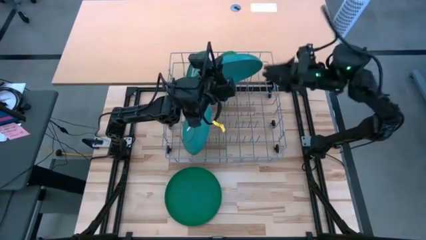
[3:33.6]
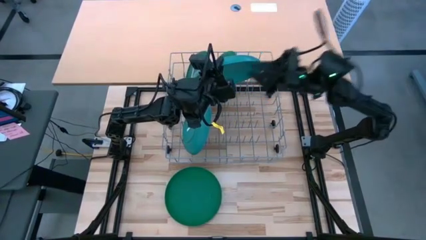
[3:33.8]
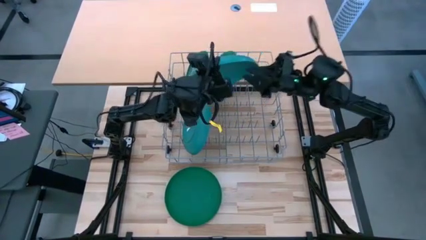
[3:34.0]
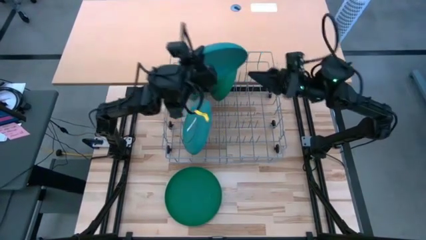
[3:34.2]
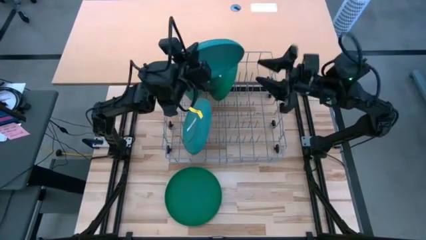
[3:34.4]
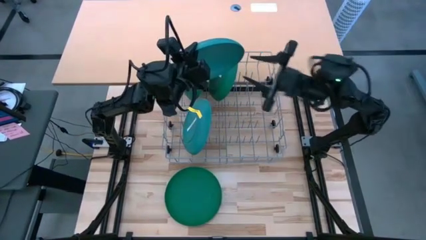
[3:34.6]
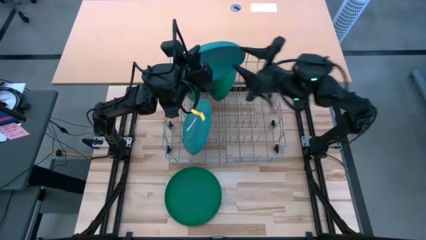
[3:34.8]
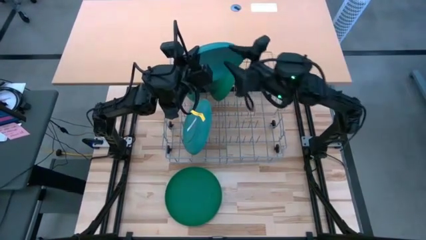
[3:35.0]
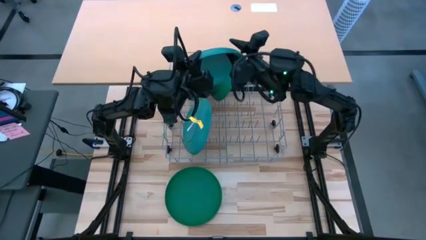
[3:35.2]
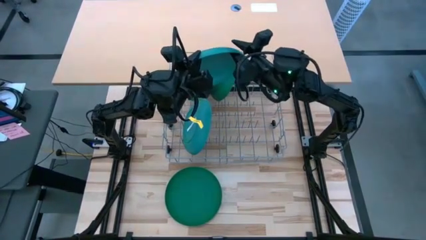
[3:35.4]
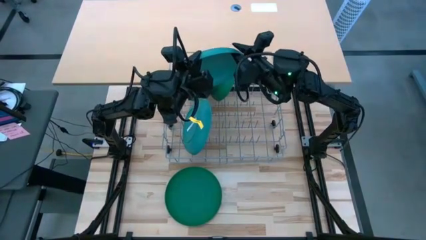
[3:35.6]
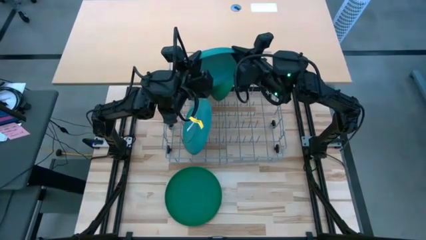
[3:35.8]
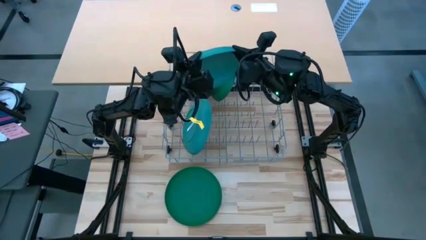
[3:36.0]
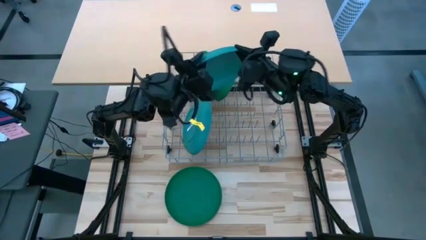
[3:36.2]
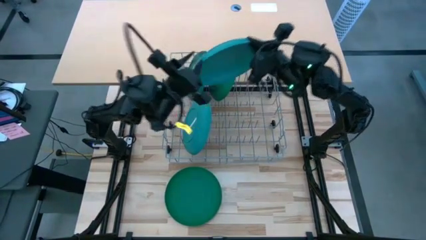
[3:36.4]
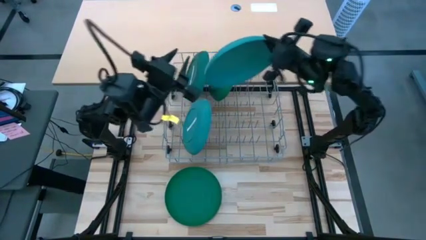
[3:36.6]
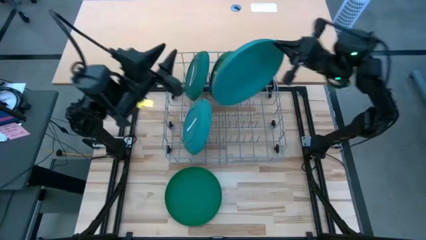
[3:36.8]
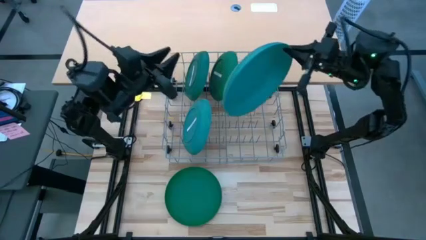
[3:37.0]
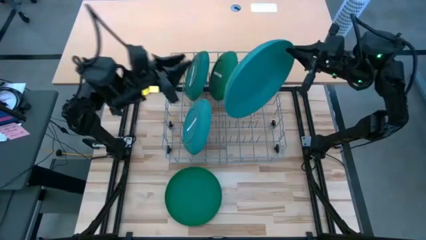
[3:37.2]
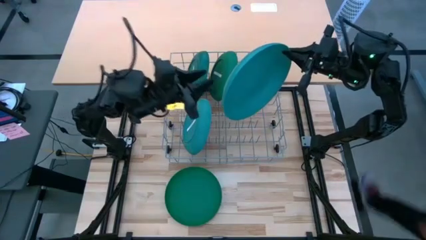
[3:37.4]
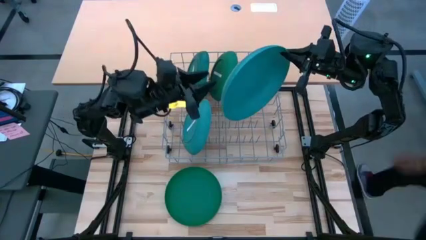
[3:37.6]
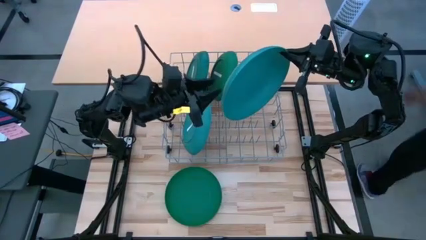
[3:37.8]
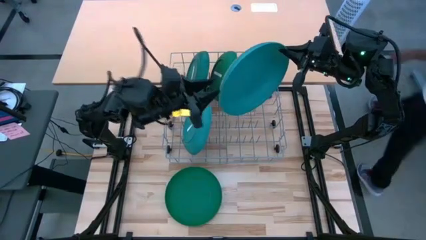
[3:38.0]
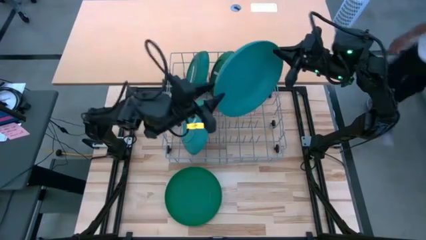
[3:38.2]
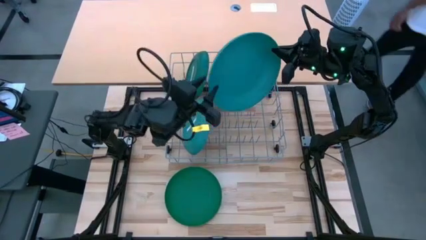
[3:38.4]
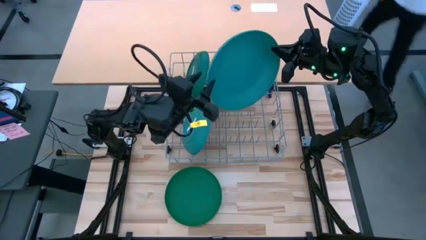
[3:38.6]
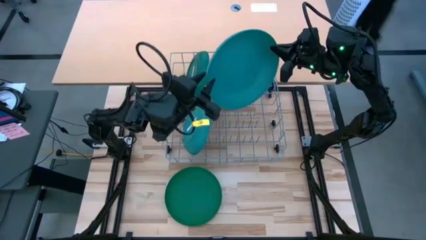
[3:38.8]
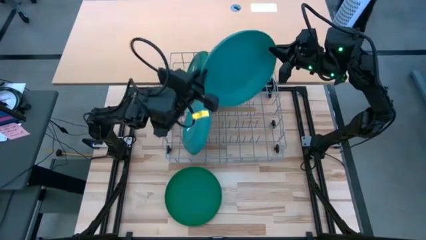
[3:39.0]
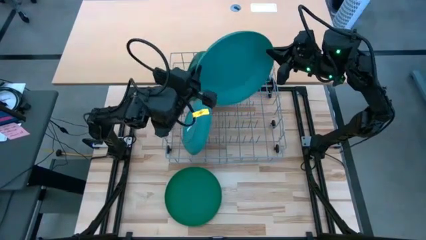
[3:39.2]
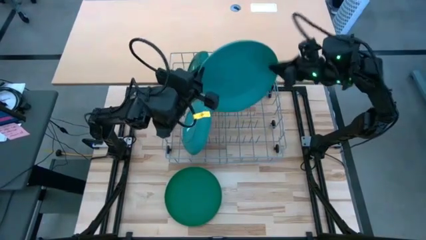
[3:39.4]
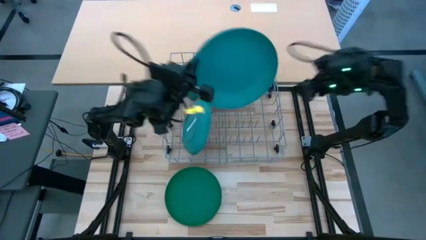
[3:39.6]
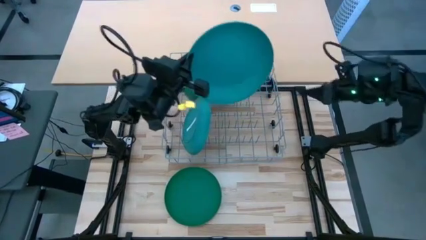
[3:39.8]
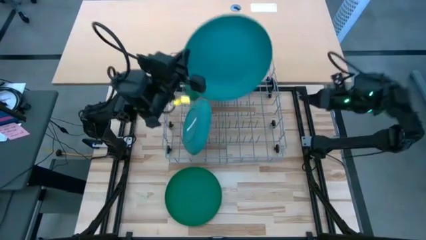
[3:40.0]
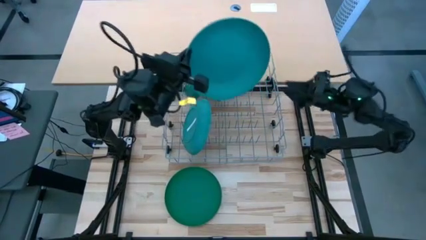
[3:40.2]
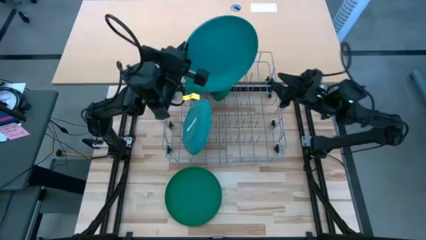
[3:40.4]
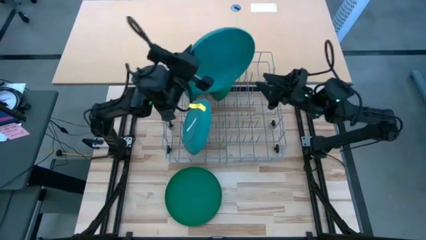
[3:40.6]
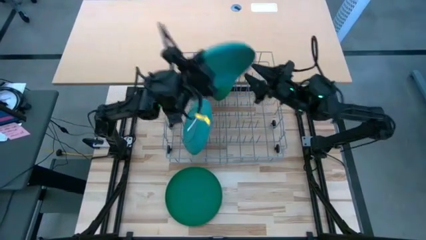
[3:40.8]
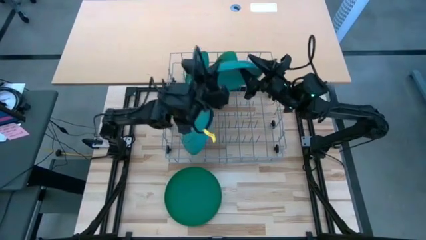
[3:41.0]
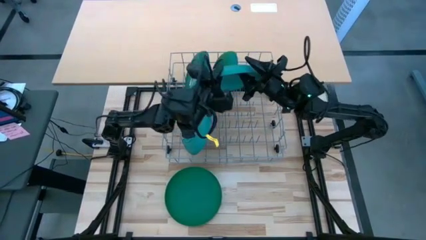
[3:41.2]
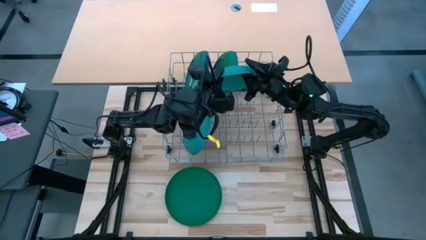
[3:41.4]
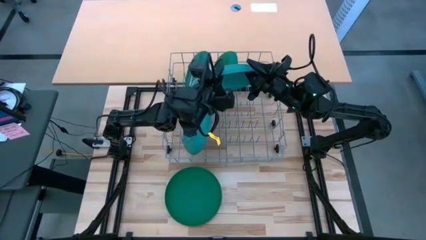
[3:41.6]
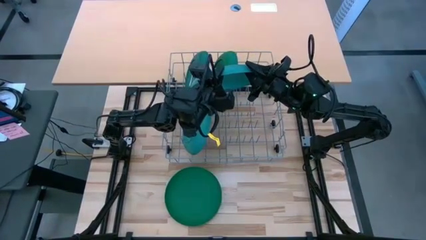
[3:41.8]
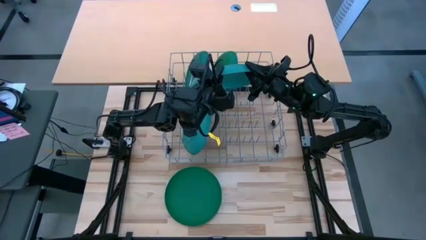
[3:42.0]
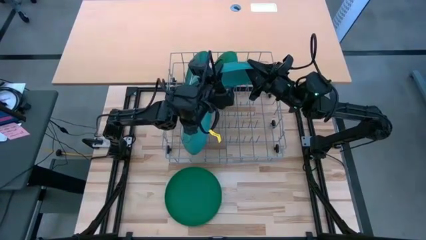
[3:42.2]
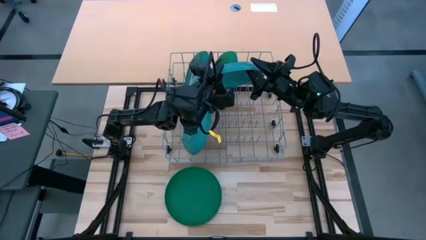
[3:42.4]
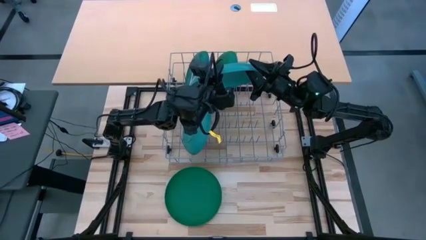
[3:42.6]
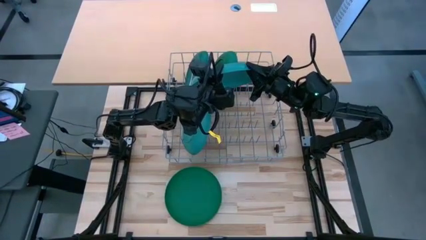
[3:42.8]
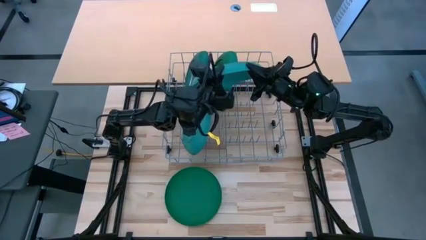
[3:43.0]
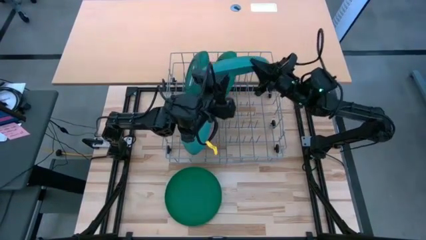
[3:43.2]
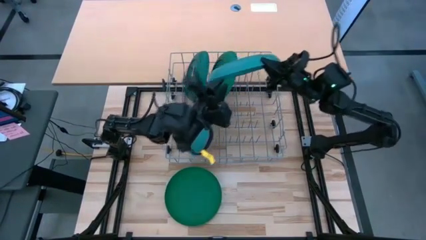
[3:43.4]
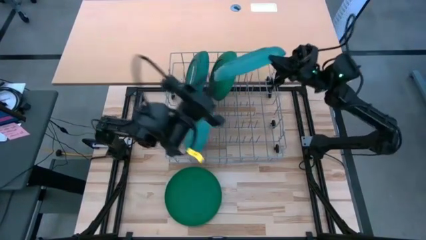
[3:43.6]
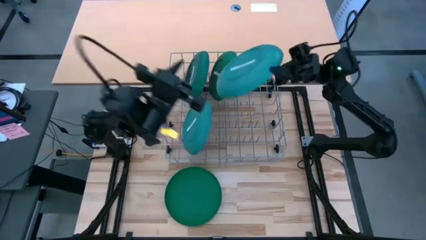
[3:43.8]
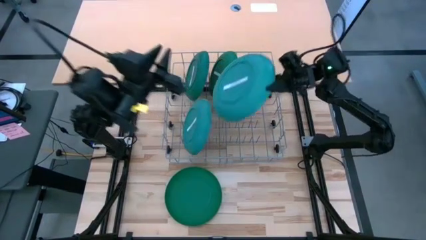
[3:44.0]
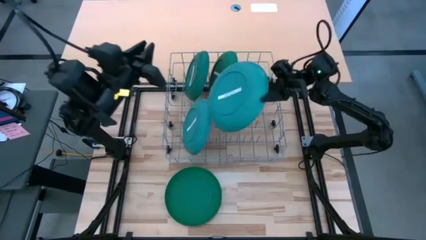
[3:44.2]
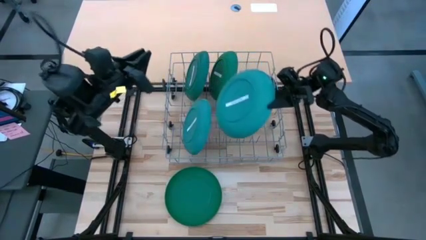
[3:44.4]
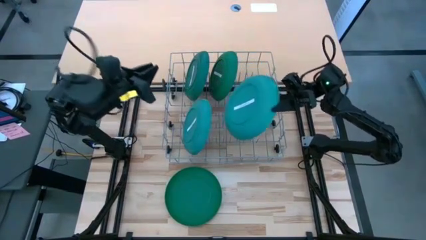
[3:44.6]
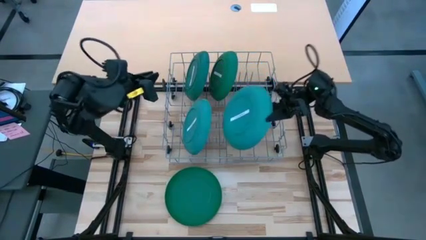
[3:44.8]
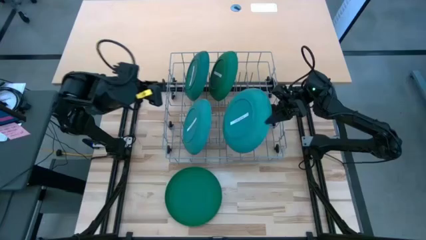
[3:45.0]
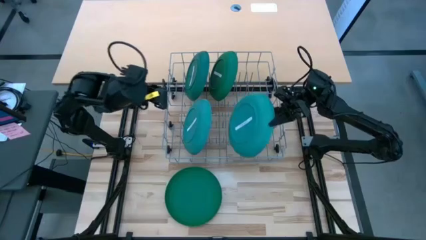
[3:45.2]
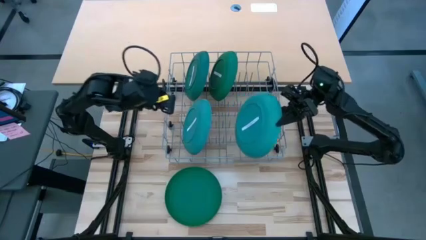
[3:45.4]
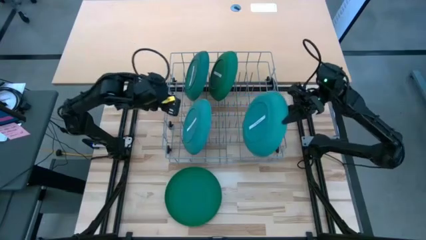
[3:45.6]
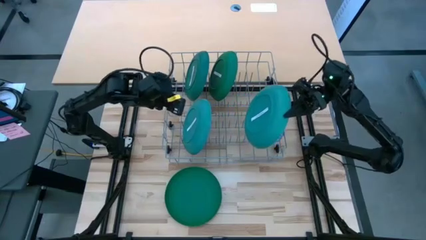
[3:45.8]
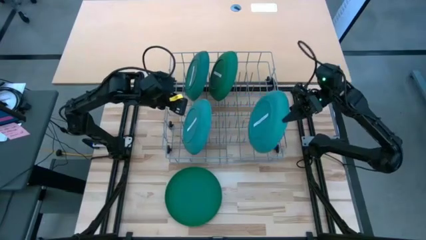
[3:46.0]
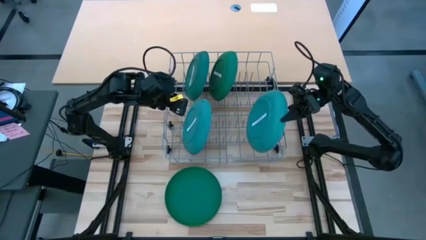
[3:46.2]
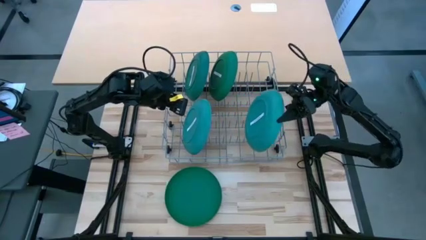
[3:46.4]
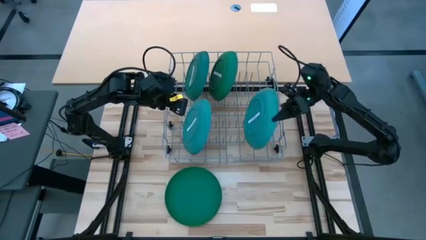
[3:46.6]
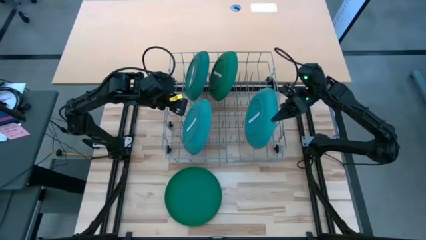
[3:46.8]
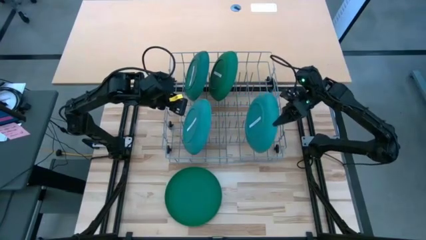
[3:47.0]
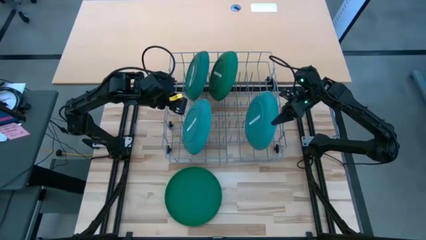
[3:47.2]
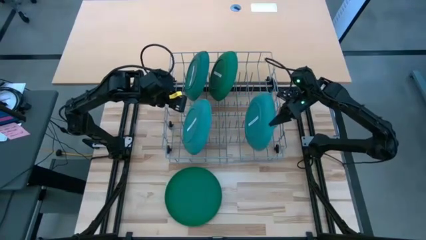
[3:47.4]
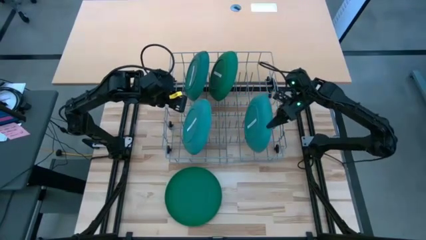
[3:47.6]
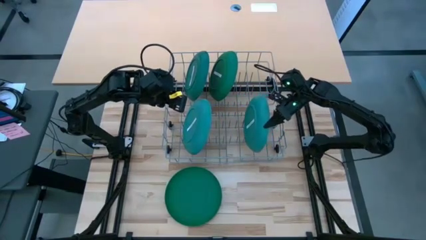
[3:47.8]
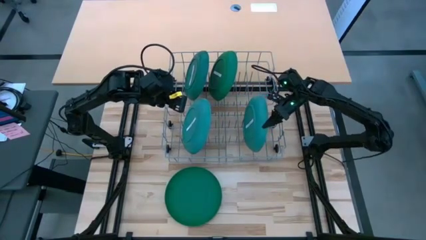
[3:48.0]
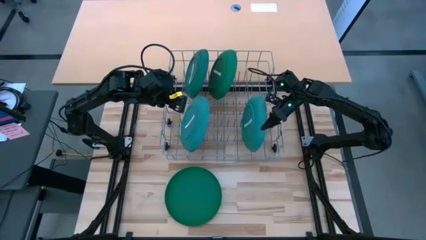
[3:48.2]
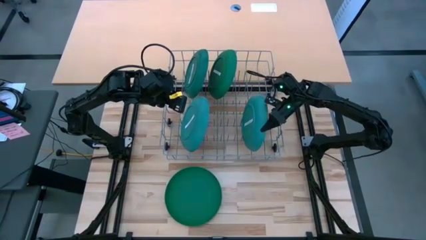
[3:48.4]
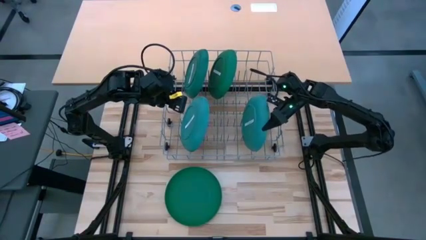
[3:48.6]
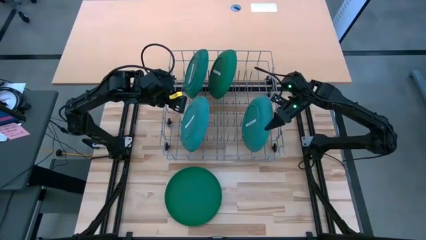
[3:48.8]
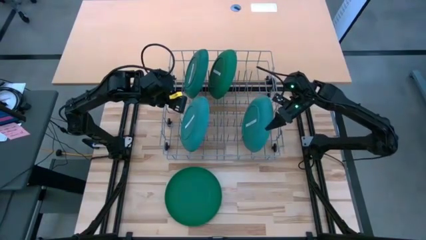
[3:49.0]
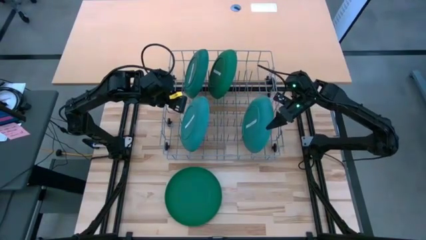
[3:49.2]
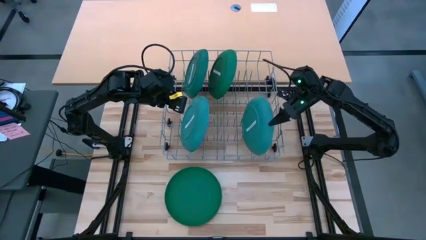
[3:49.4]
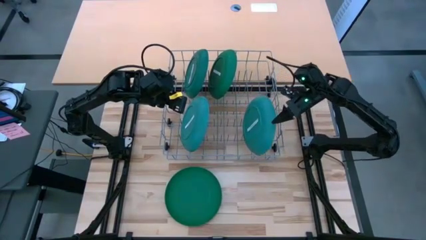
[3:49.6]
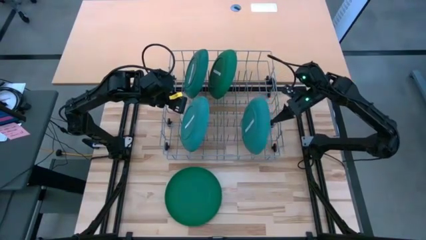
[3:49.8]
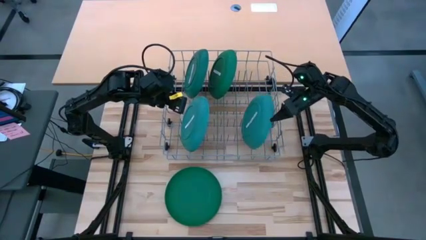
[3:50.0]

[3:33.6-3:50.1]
Task: Sort dishes
Put the blue plate into the dish rack
